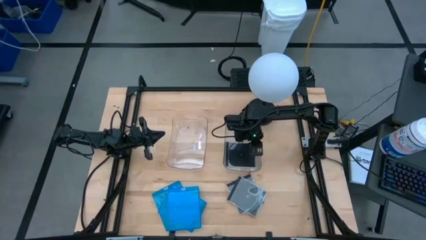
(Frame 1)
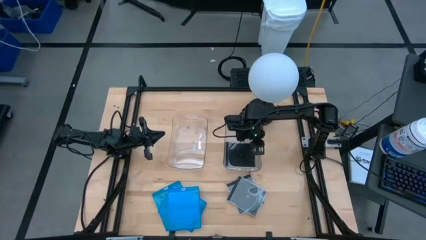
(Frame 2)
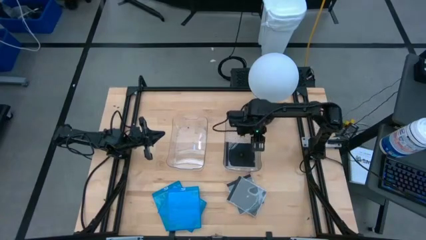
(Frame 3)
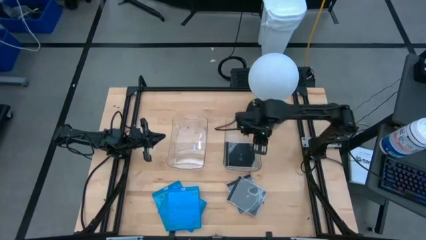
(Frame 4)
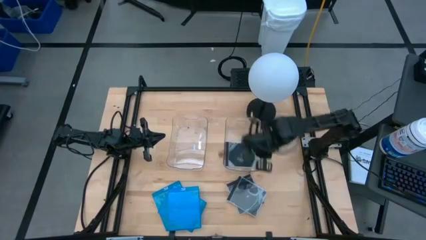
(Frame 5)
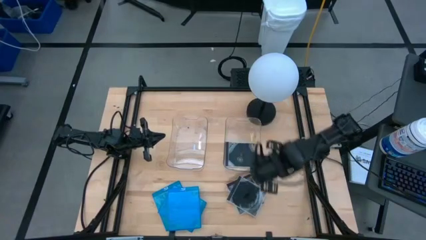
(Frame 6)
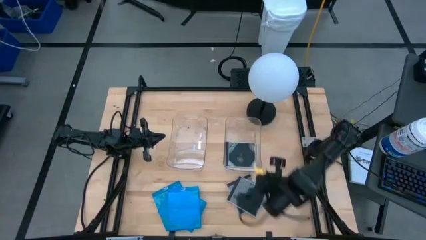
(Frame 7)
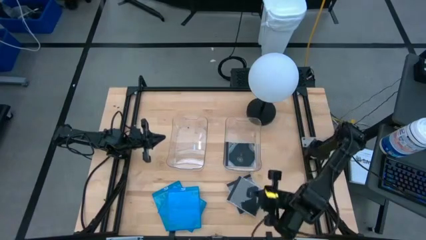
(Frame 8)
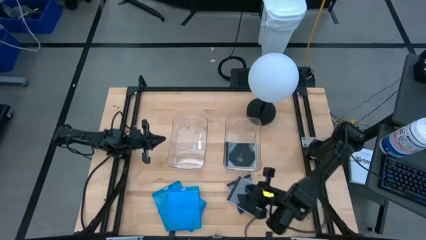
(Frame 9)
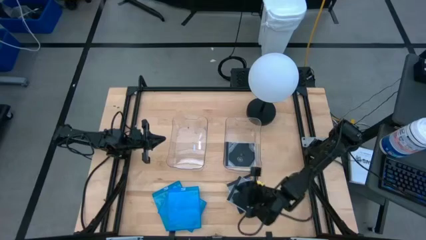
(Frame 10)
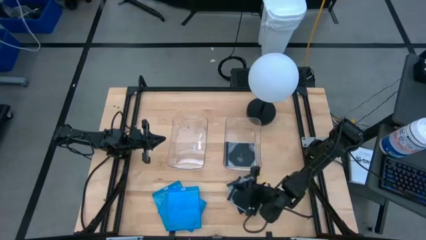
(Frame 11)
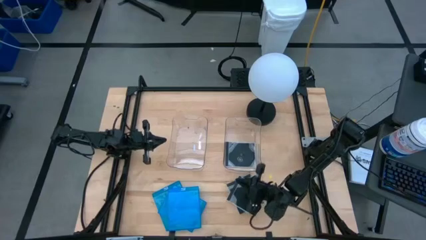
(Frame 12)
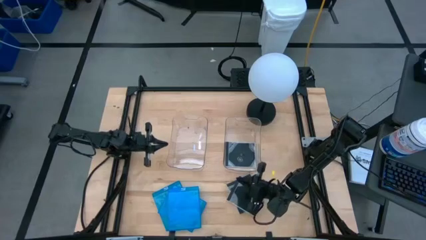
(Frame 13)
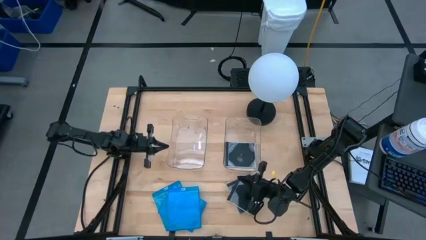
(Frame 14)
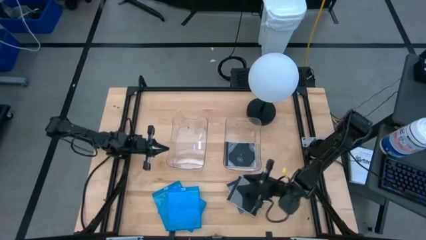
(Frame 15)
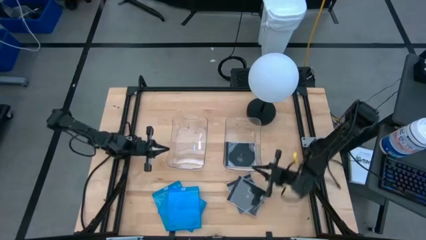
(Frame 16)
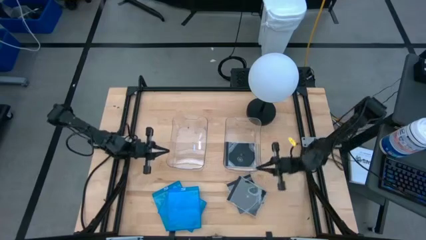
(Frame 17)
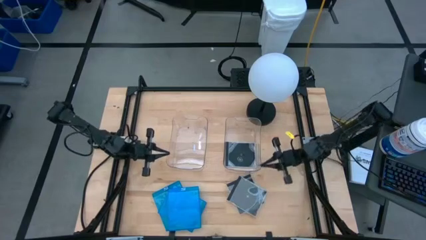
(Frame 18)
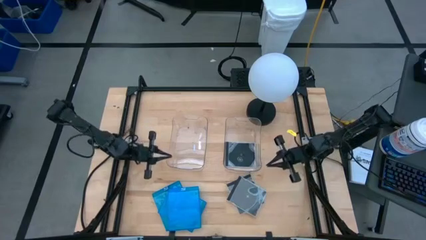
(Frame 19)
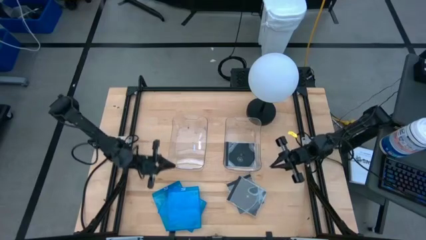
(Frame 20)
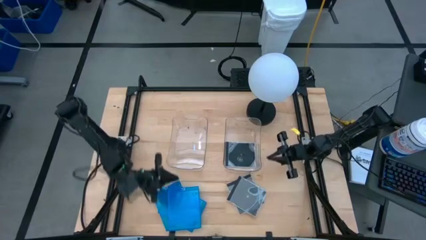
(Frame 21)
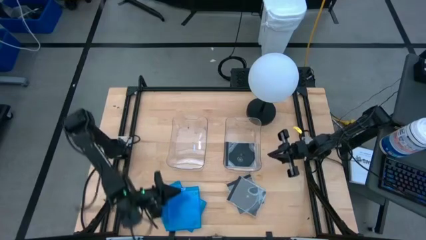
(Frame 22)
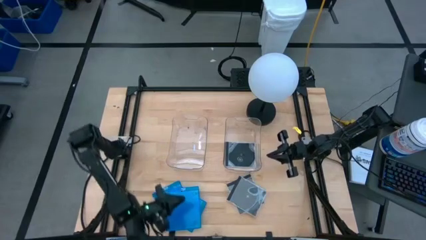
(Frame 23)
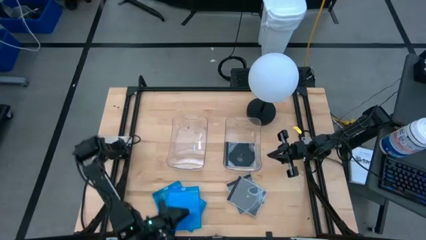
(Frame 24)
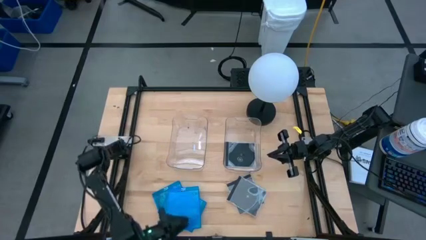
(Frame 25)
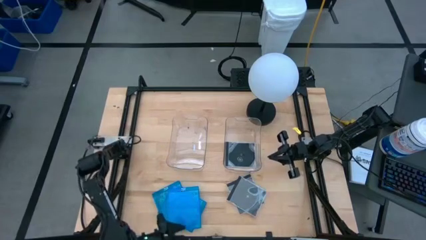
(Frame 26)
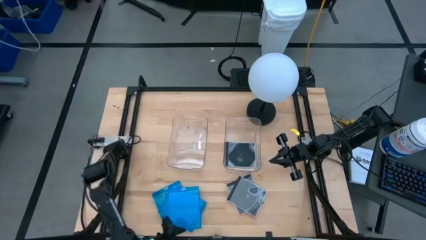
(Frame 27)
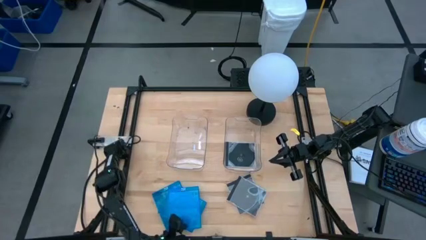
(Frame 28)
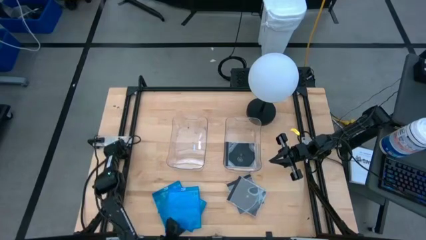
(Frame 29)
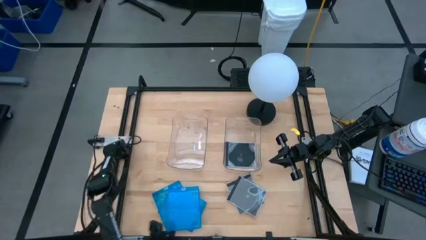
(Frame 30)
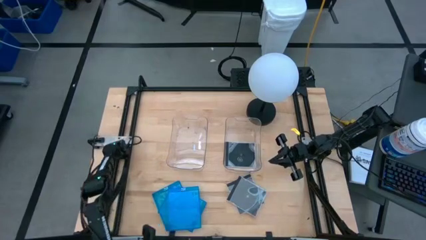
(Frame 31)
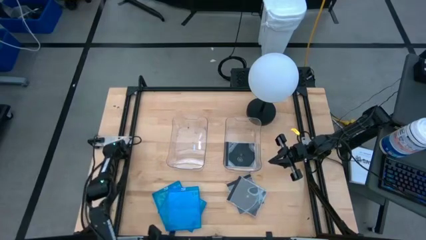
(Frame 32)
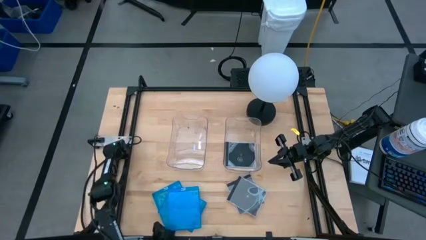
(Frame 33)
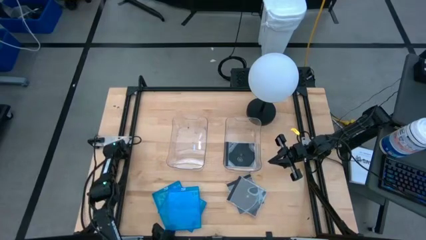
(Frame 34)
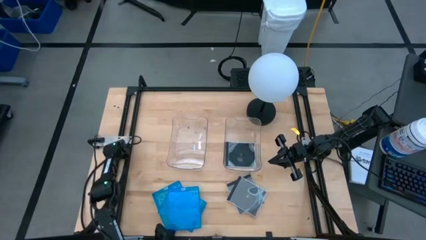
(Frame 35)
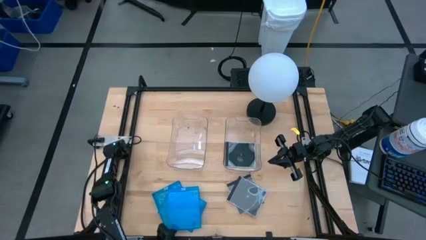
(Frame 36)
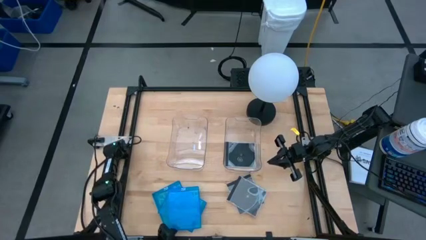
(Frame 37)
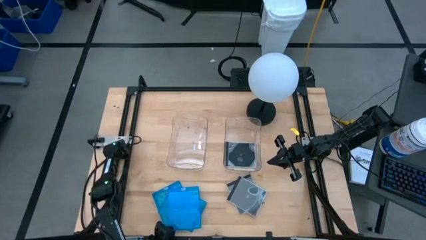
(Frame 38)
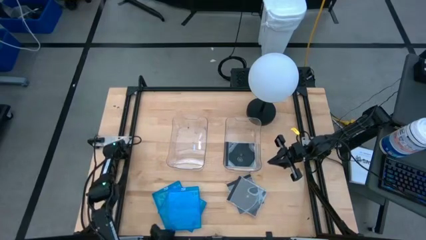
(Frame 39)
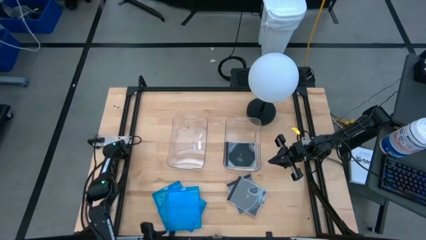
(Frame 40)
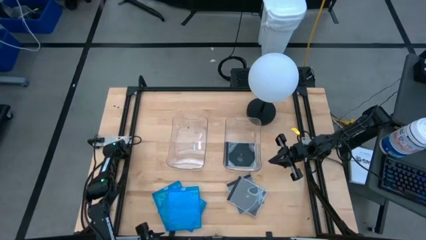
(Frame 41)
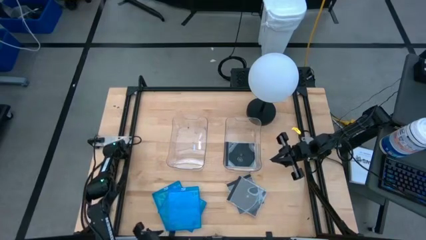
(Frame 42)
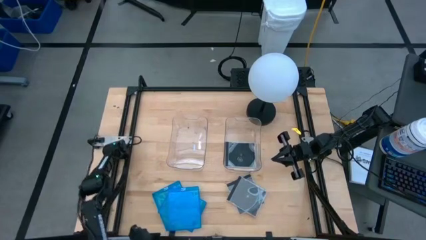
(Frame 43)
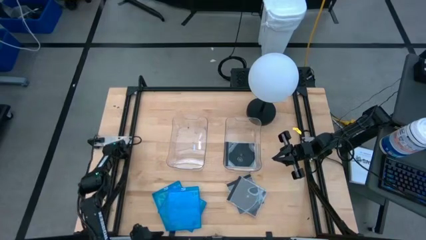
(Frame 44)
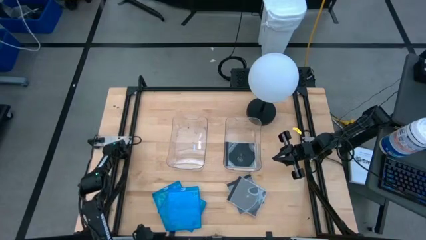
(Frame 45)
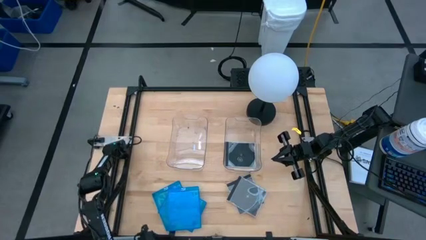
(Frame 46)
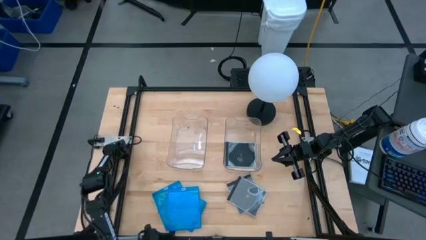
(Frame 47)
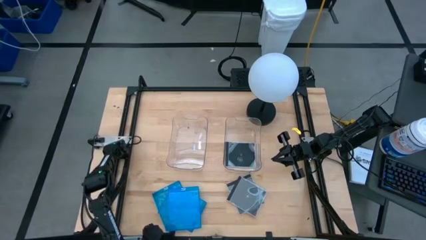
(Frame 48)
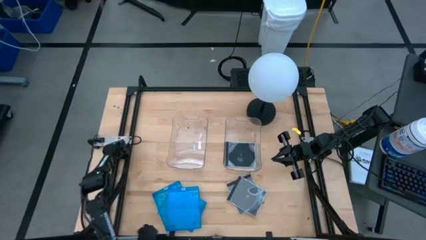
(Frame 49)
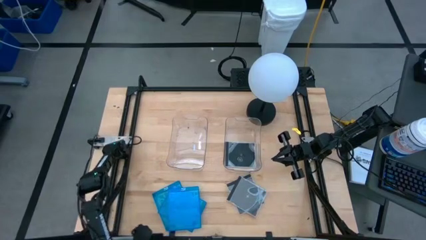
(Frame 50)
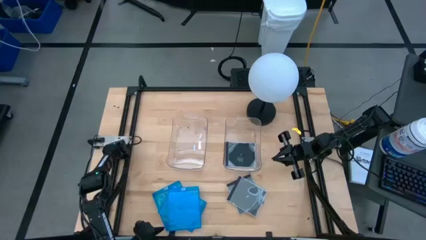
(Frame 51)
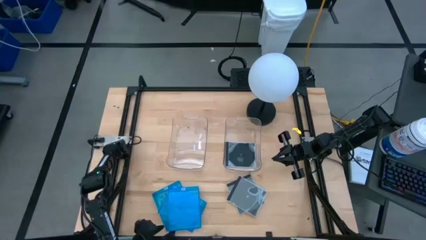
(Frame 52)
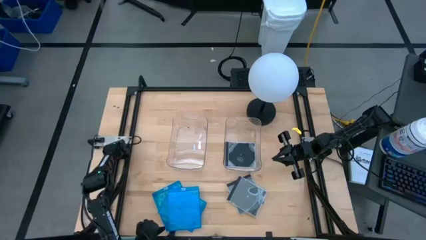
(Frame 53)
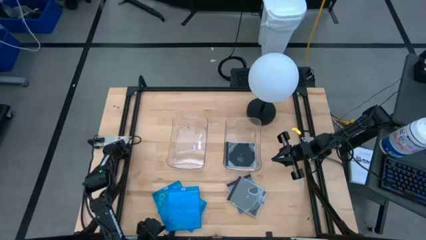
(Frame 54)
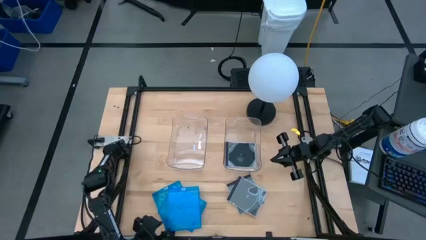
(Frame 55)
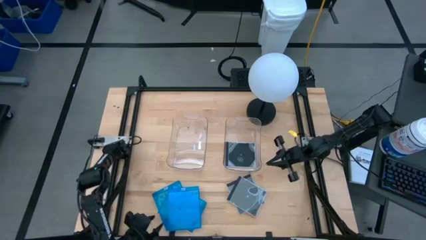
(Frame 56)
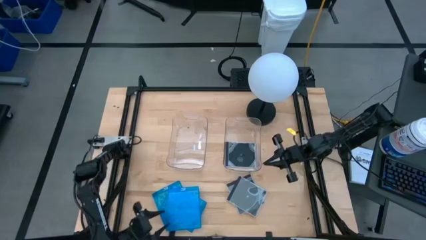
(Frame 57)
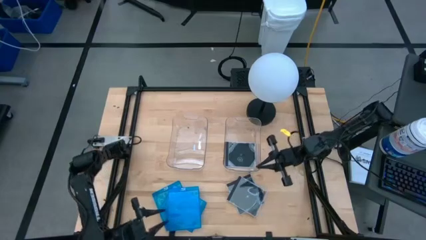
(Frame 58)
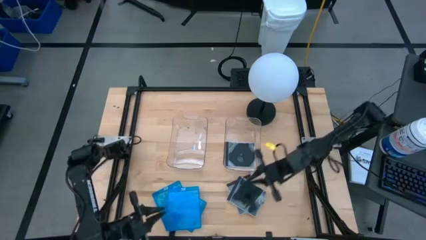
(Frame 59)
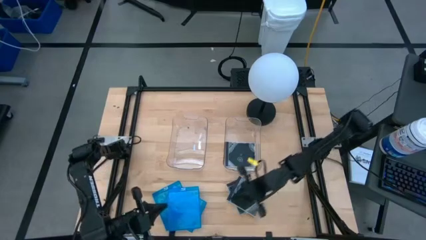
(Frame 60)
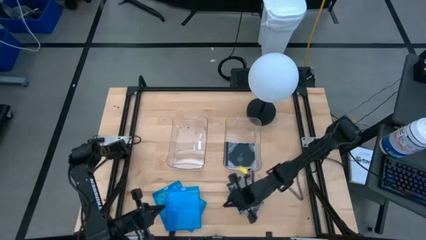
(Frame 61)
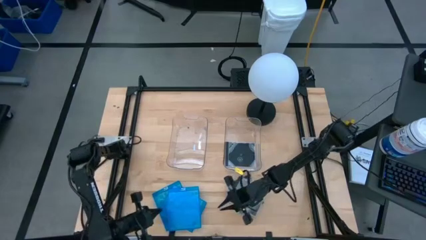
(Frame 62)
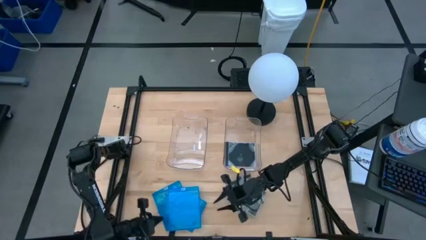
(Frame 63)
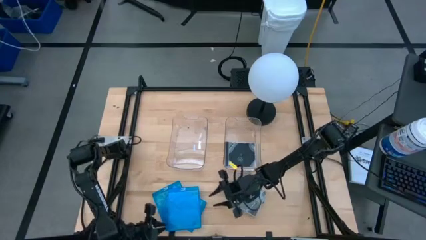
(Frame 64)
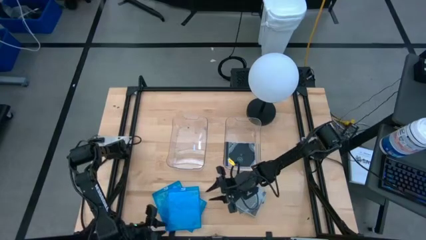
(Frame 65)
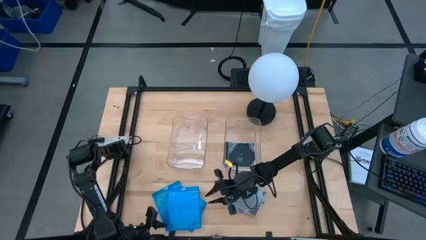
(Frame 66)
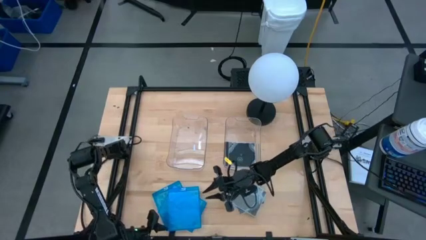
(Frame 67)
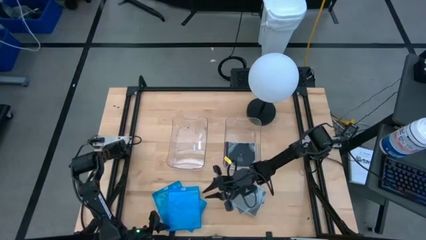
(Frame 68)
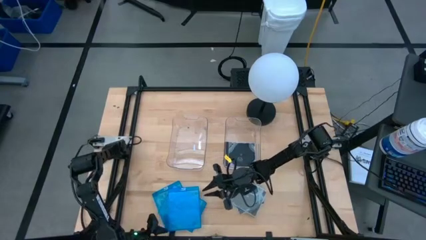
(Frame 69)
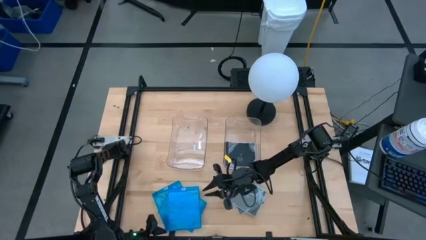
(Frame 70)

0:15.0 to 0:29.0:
Task: Pick & place jewel cases by type
Put the blue CD case into the left transparent bin
